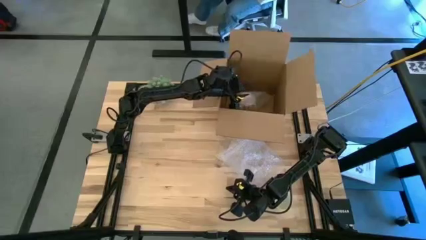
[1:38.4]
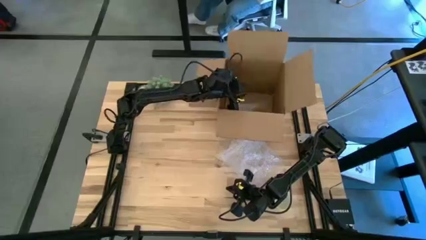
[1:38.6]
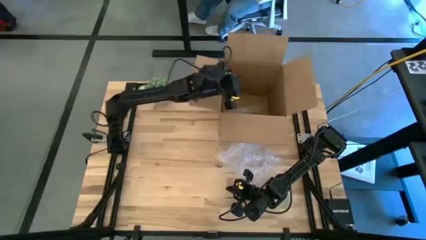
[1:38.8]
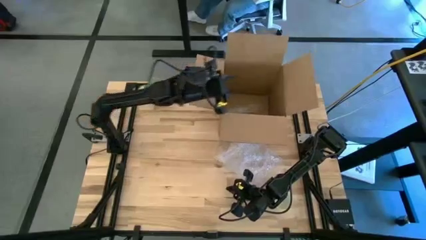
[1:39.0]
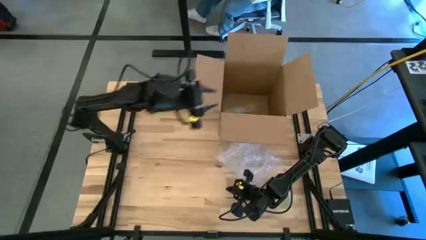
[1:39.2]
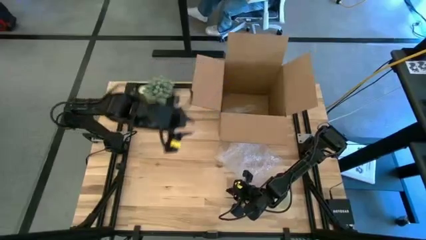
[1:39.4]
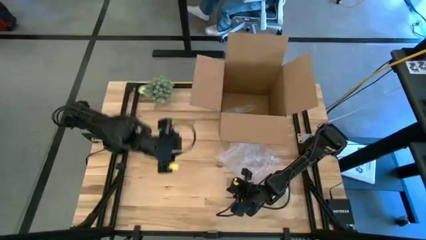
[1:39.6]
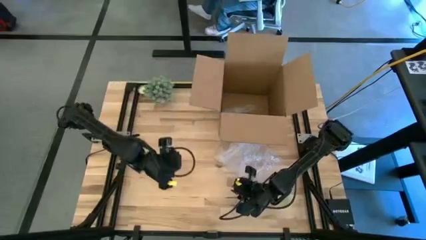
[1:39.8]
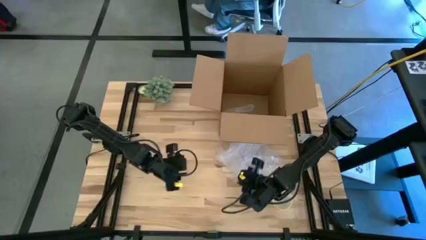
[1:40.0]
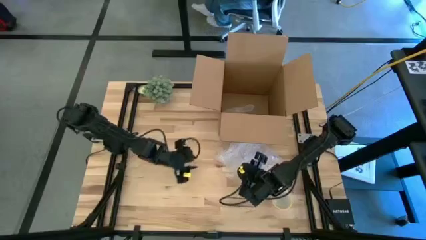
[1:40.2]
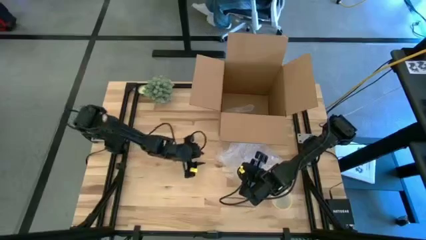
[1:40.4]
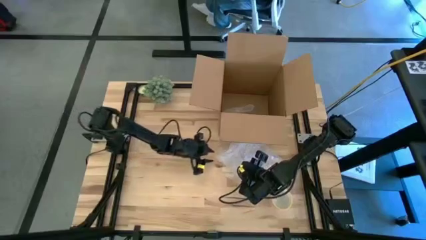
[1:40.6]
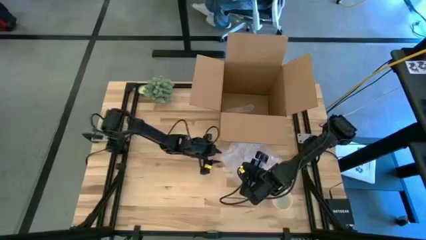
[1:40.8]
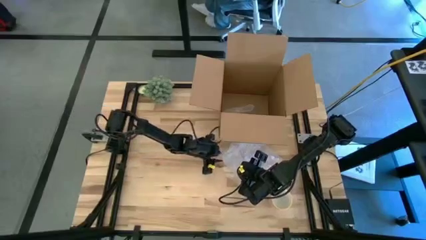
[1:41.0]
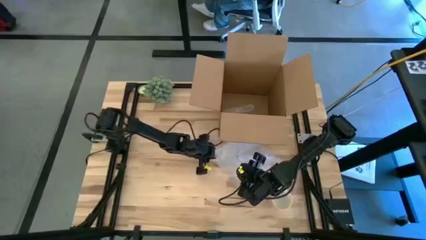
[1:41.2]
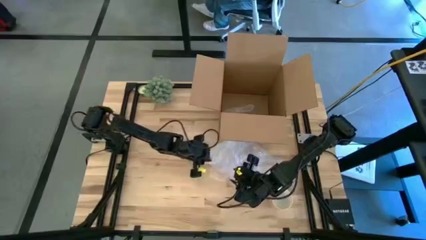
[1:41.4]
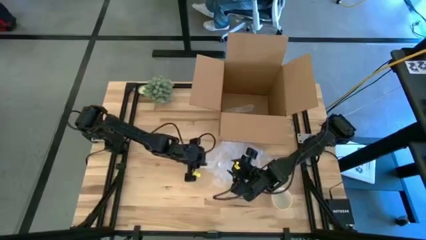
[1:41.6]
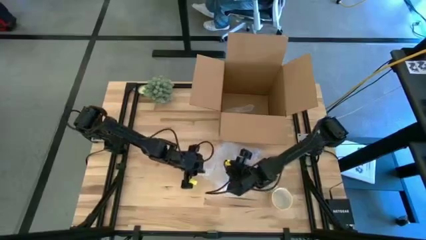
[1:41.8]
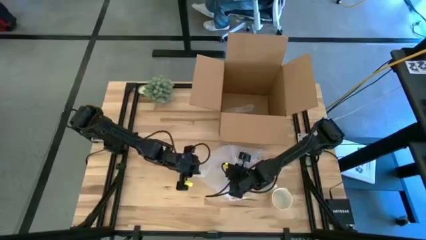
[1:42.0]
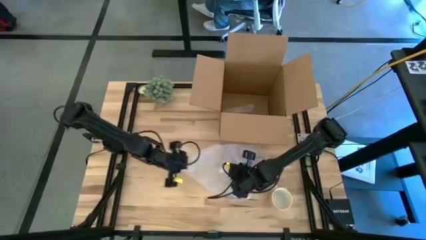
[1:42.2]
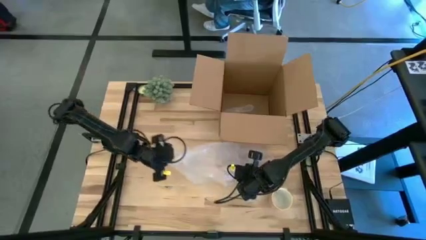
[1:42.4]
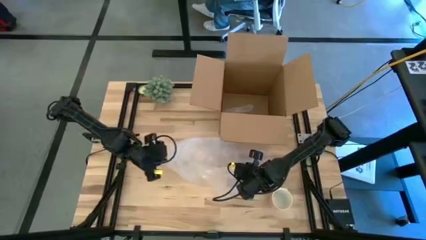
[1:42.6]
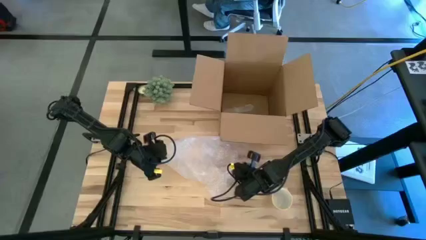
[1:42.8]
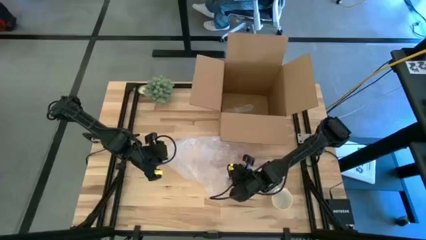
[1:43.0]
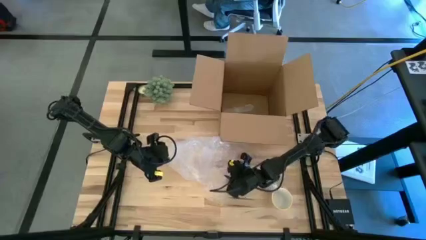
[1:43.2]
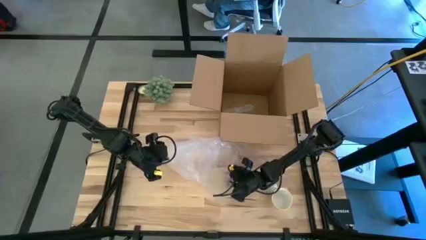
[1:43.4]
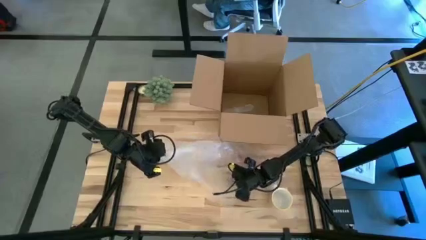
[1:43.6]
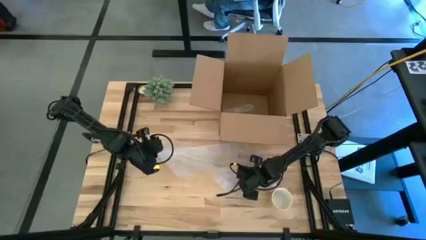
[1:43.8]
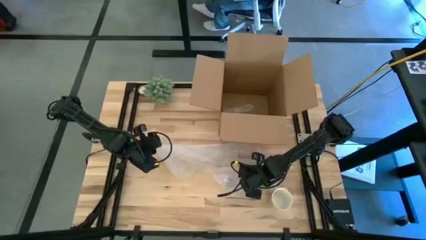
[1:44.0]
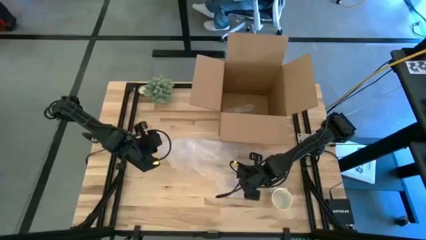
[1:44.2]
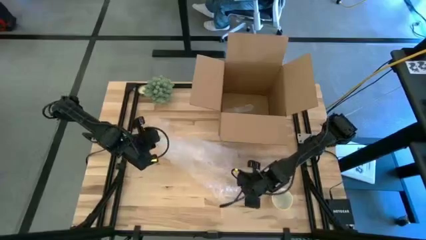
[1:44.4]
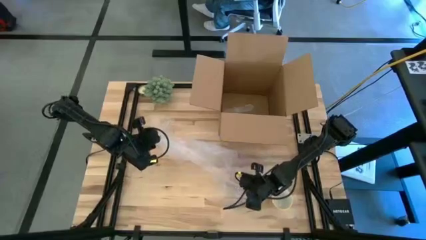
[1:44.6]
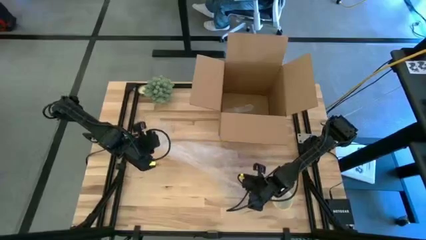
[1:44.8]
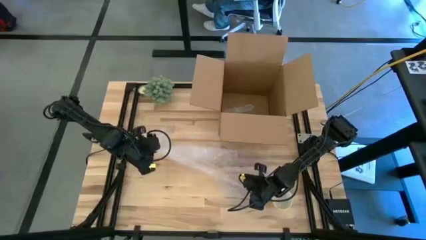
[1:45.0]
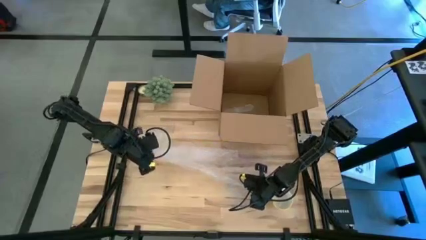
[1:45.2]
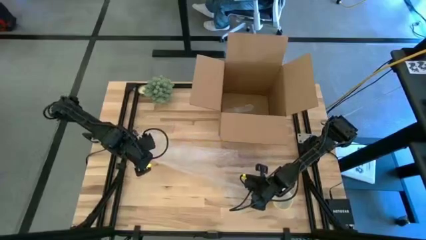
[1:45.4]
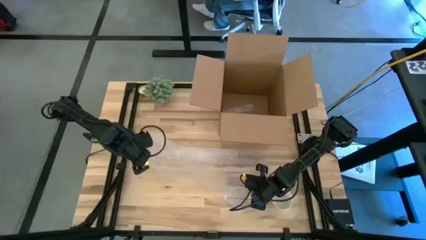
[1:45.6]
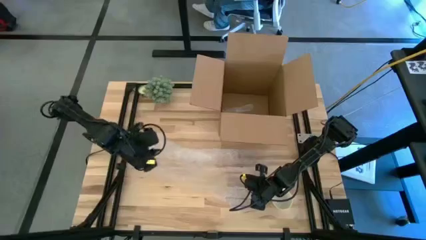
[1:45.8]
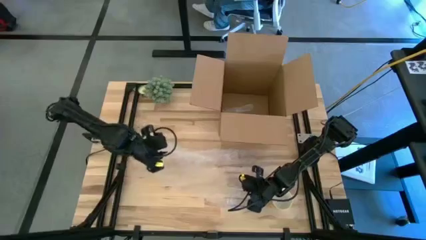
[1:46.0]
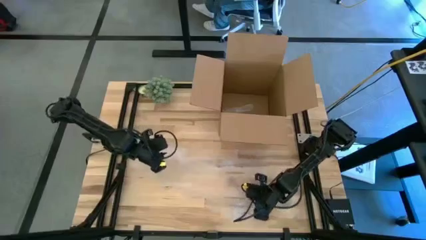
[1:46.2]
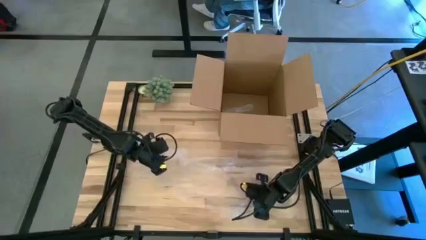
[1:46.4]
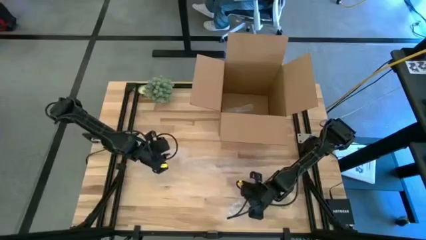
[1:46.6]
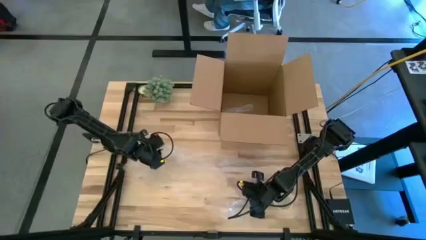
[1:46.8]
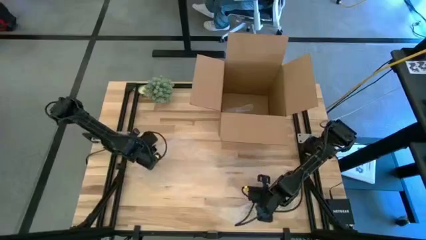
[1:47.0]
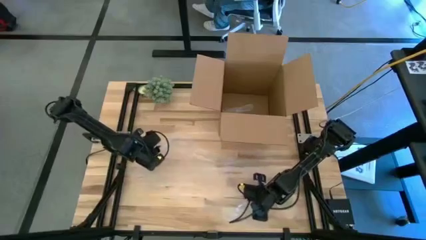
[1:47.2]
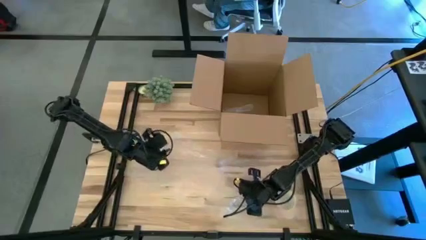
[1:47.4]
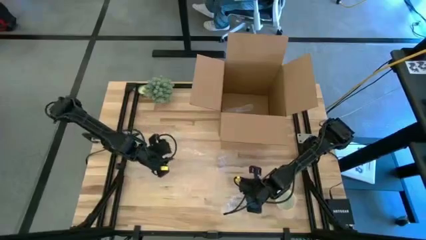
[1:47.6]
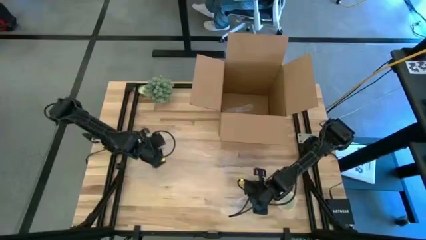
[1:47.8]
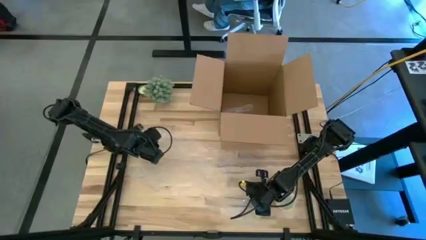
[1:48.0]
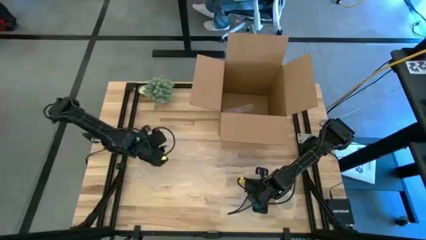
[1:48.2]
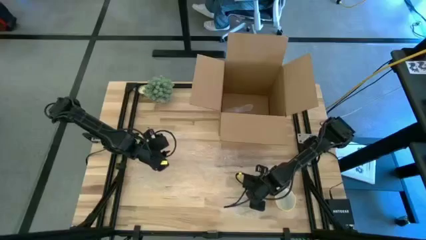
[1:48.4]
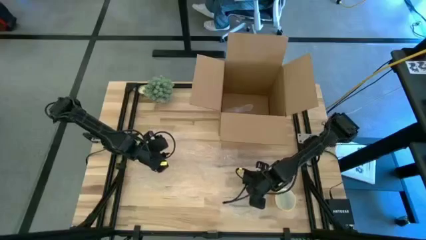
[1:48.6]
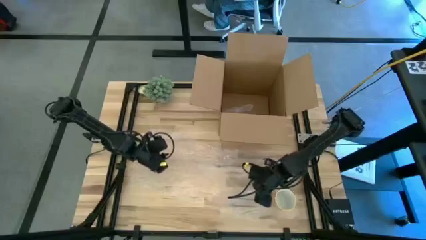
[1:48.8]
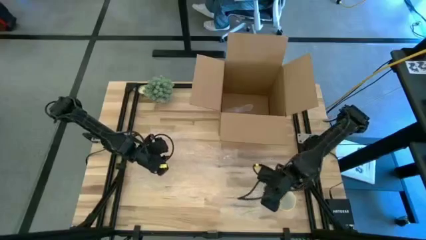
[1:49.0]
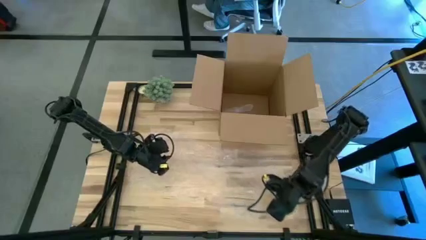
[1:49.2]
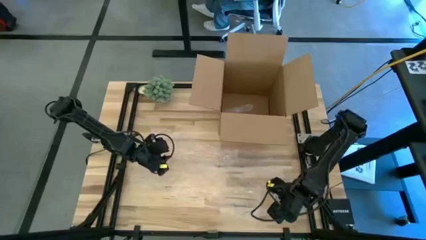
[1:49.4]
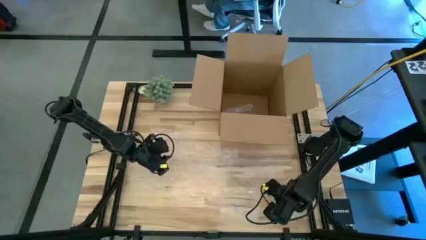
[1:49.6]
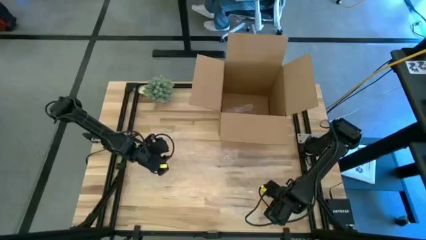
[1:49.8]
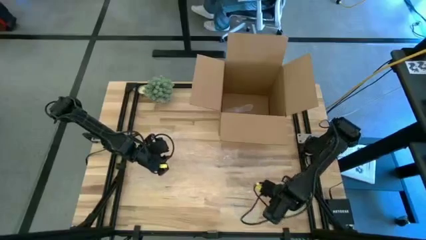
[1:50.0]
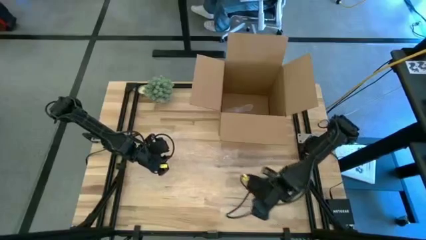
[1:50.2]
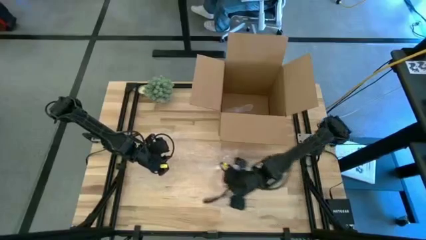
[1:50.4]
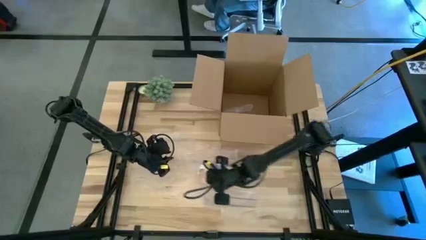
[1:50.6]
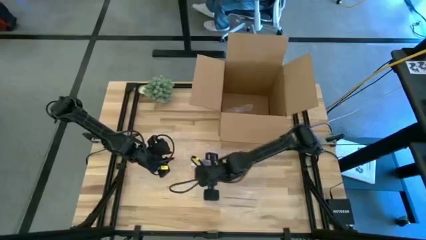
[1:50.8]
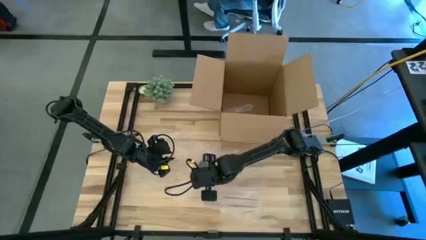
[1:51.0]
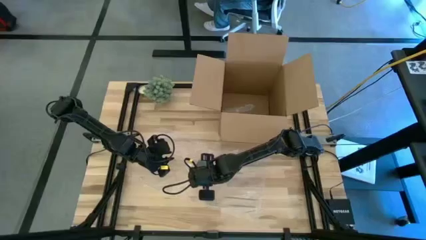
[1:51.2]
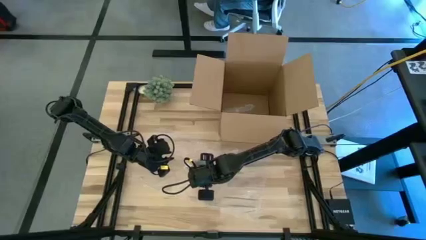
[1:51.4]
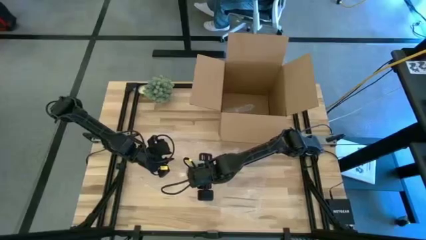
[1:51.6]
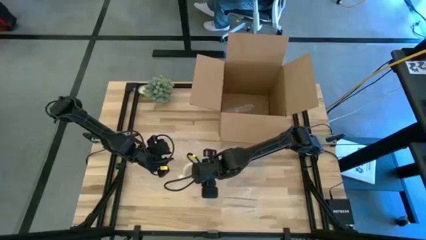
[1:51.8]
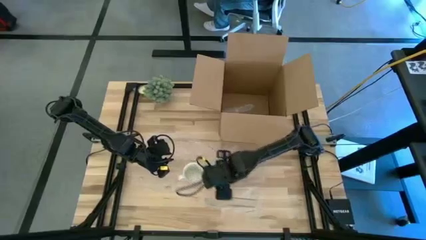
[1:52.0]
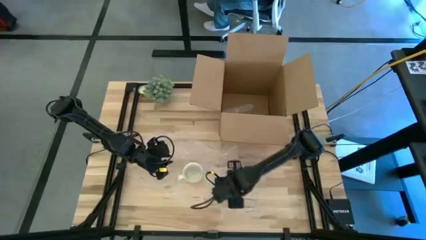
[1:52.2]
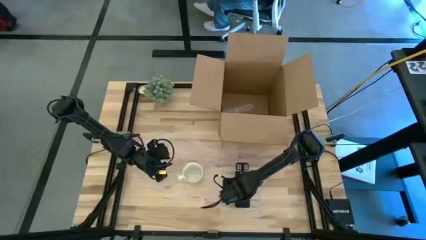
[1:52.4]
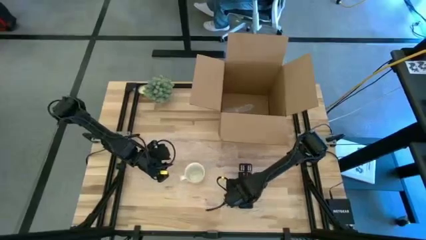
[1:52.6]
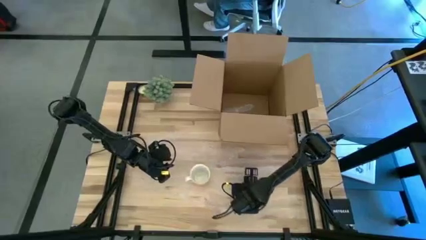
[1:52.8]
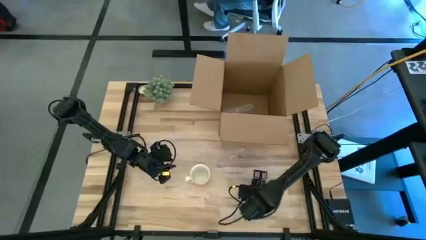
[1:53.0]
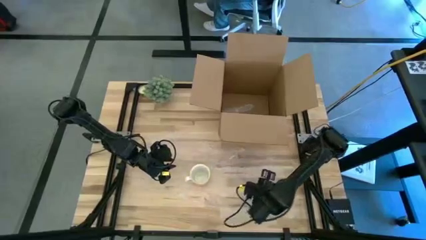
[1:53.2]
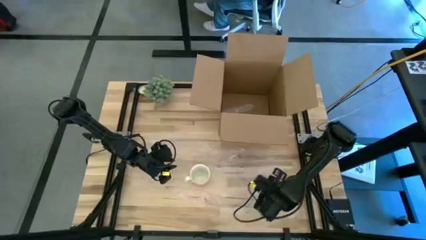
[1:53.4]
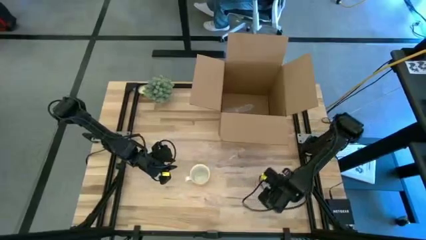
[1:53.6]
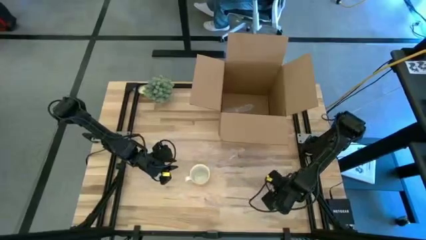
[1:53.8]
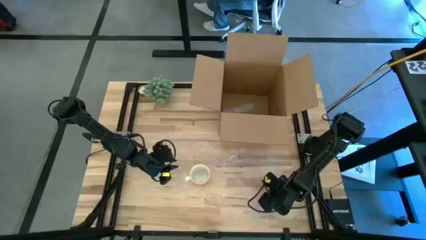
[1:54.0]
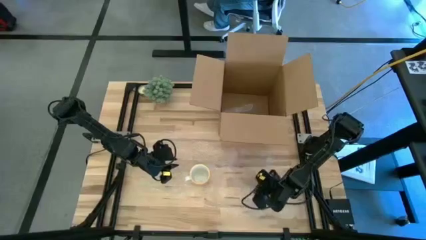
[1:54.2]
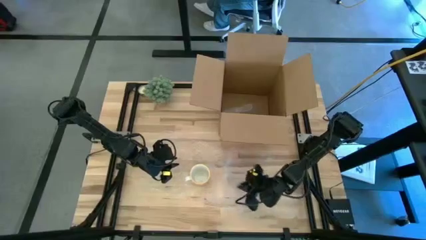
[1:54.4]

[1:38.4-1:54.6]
Task: wrap mug
Wrap the orange patterned mug with the bubble wrap

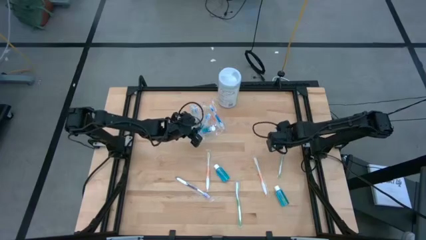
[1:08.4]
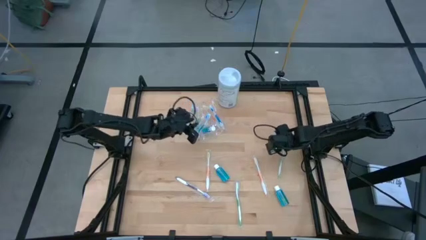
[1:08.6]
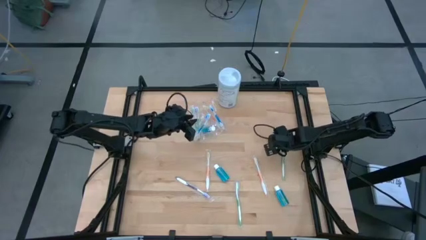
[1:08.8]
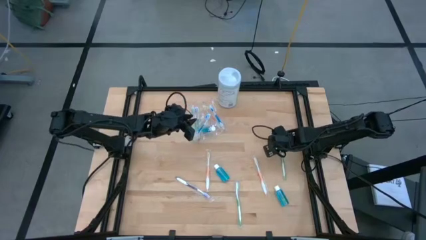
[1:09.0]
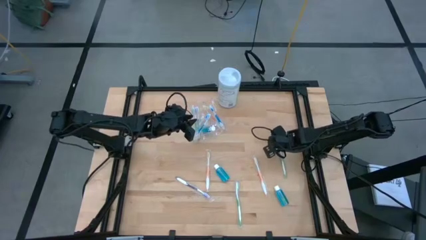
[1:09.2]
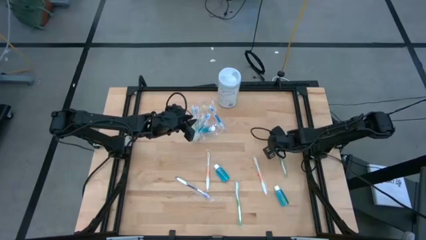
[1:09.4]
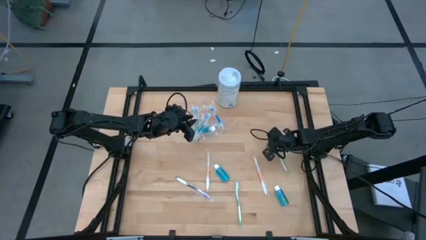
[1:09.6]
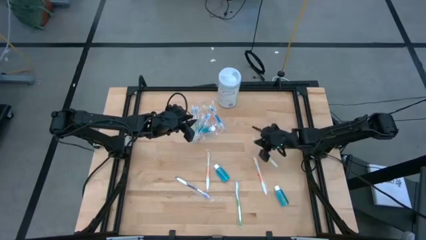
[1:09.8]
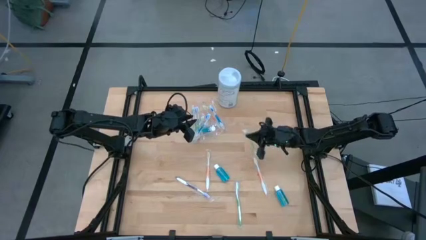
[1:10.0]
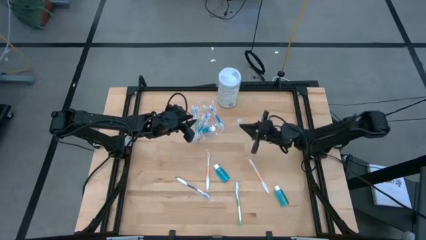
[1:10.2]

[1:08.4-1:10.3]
Task: Pick & Place toothbrushing station
Put the green toothbrush into the transparent organizer
